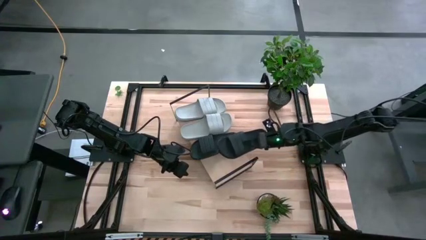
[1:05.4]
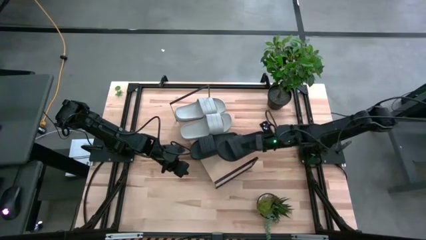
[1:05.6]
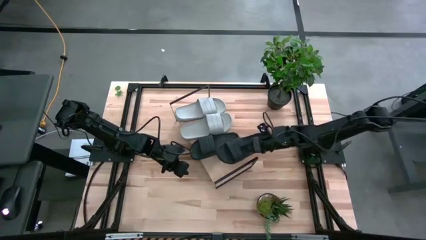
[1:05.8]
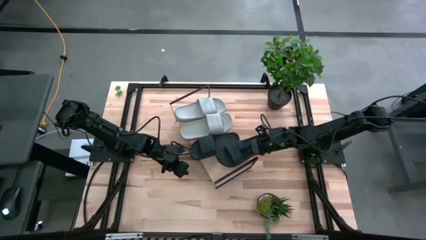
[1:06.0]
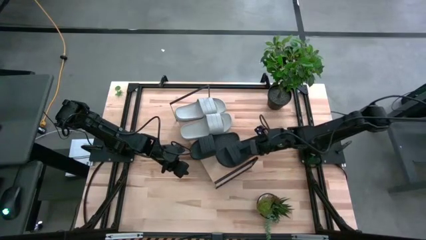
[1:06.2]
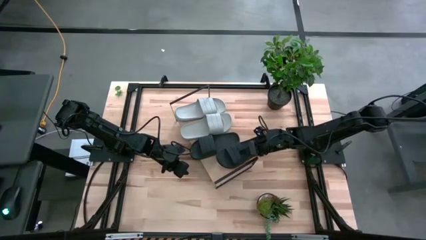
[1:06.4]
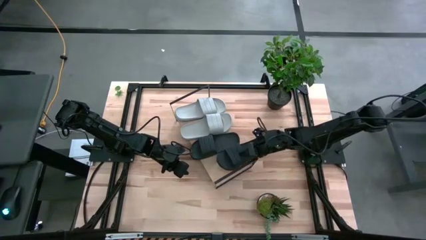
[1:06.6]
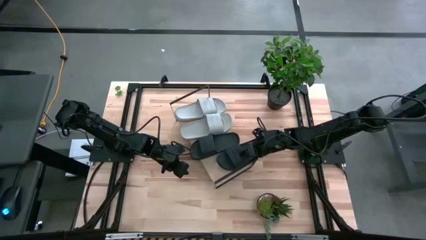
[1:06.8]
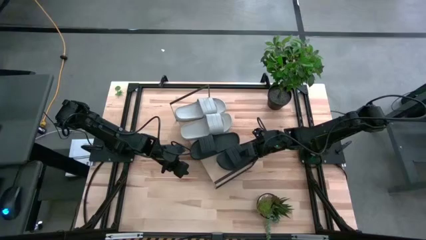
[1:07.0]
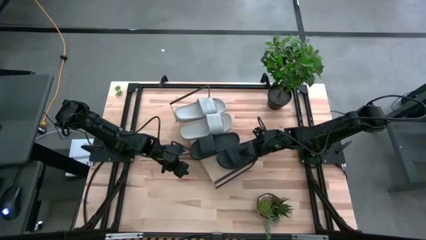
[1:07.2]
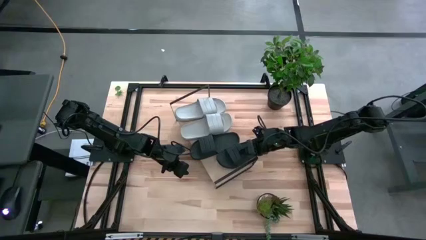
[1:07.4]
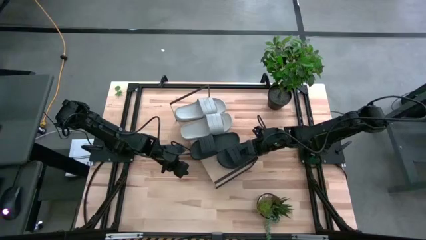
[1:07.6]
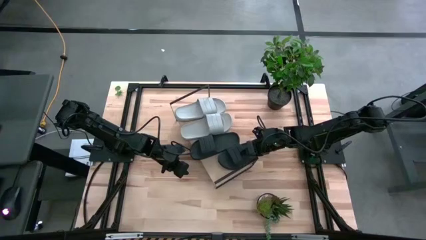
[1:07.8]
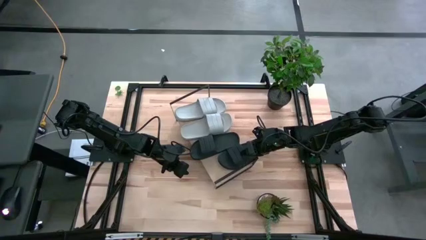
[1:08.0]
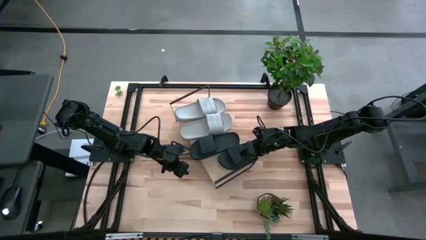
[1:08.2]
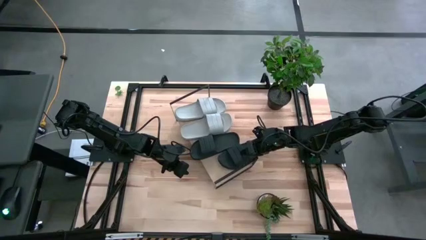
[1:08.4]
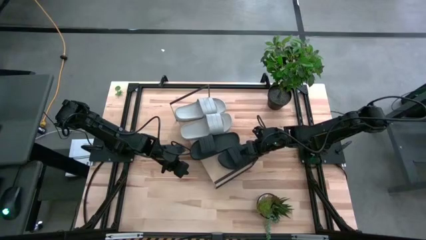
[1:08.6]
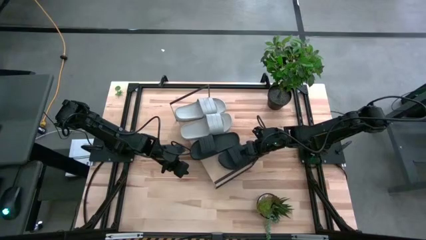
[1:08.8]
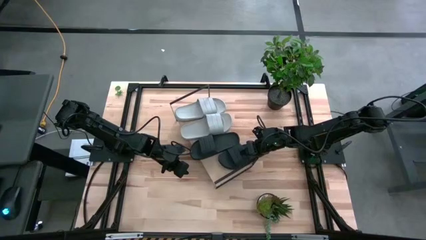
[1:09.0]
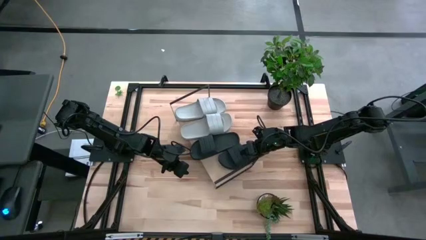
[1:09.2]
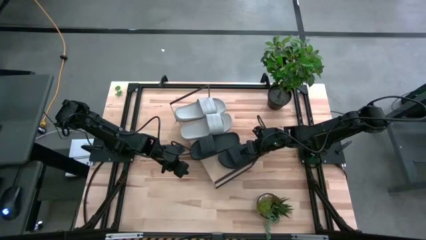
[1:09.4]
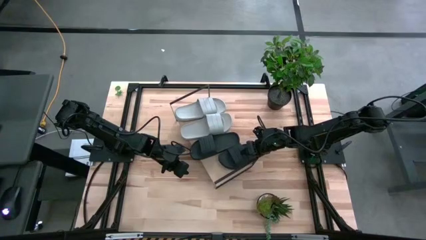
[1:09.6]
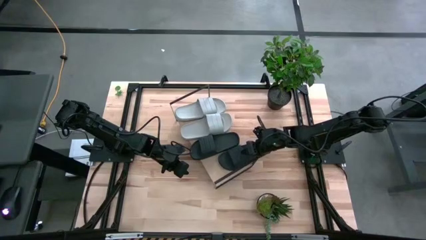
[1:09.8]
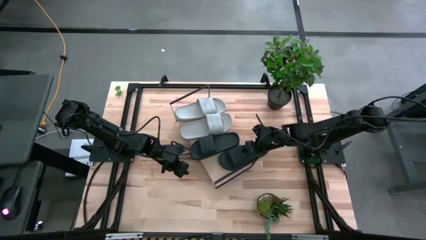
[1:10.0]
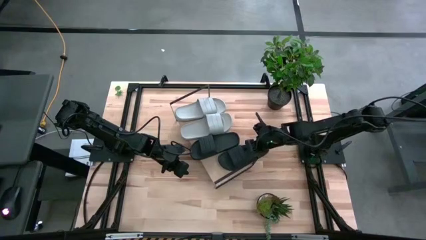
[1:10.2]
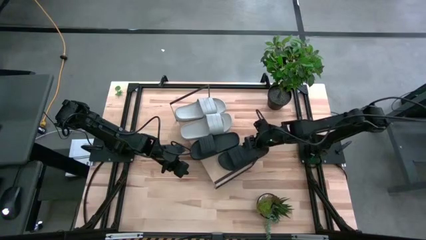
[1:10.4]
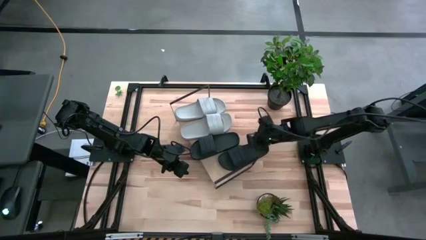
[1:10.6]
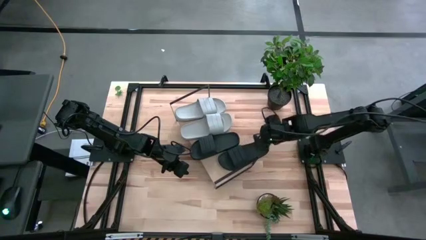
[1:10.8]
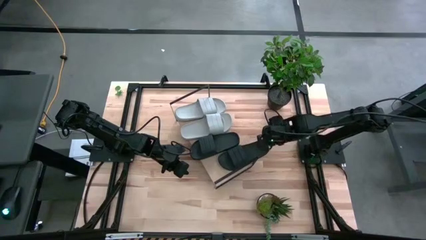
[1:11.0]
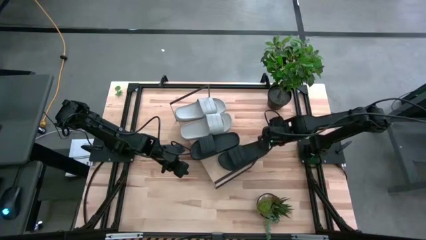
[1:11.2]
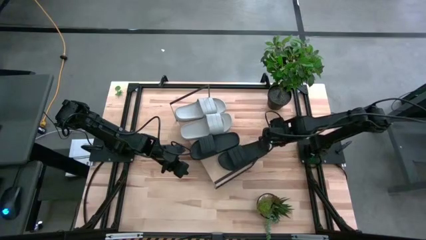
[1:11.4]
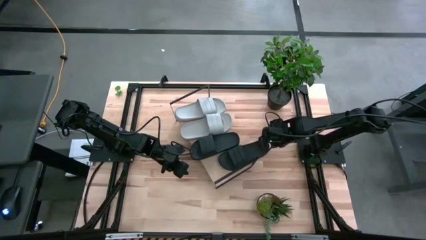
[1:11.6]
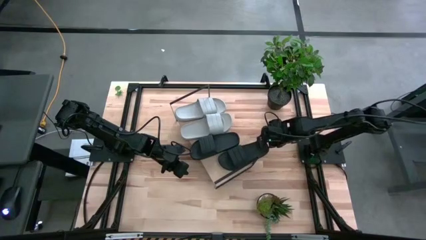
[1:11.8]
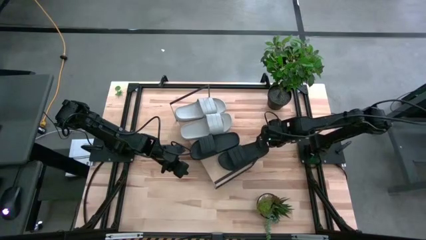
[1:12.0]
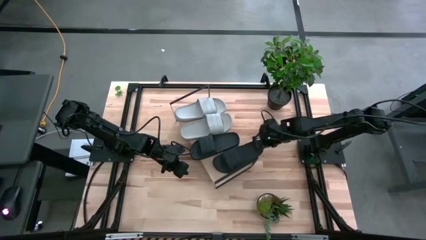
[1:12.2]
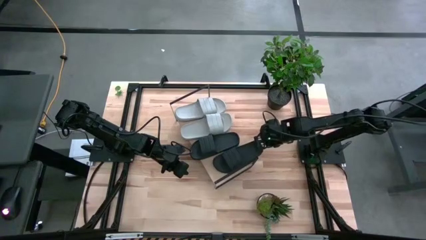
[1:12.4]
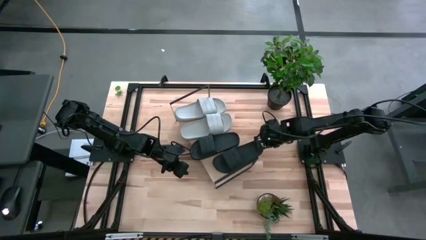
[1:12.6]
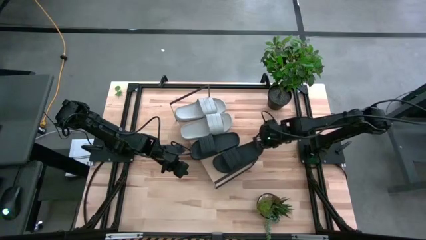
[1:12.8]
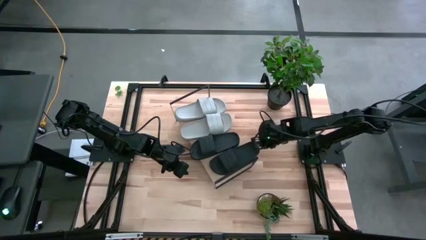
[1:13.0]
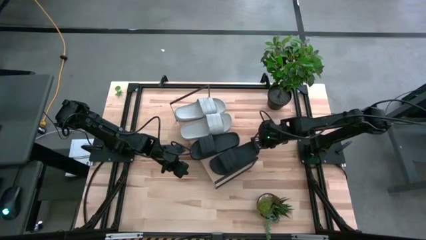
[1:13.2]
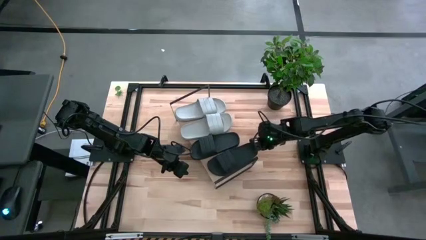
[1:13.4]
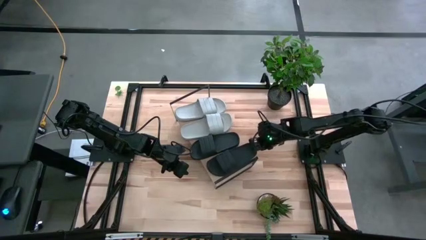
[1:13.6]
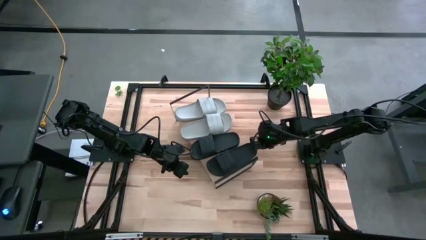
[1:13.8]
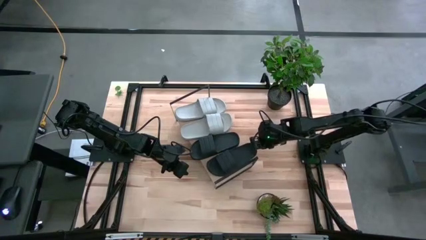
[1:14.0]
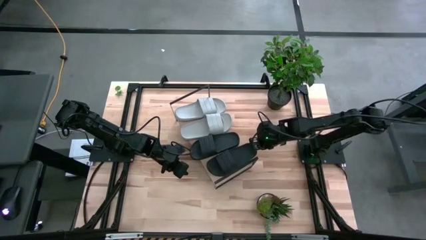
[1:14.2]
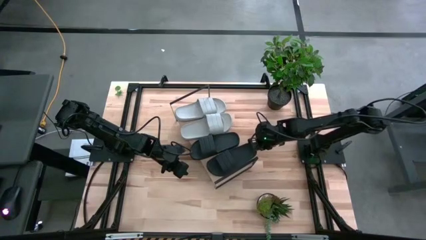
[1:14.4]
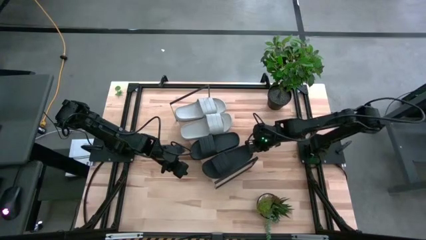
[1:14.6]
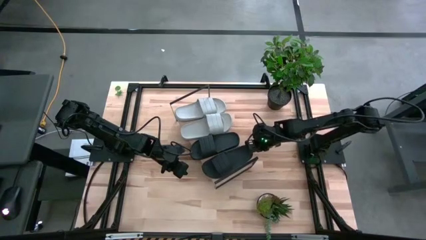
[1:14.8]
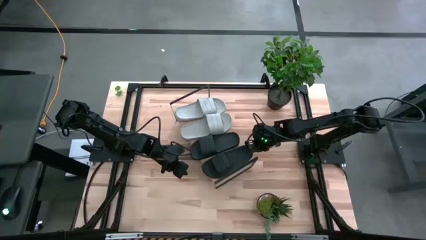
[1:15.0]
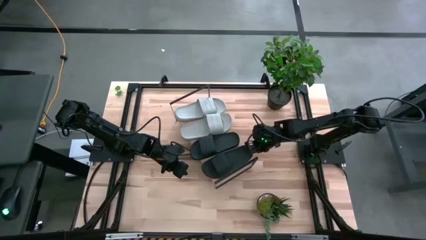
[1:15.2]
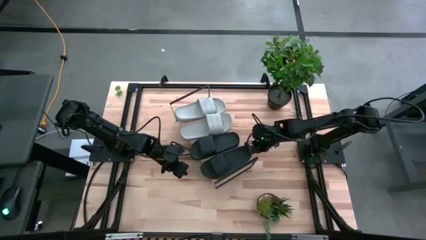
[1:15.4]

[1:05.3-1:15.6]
Task: Pick and place slides into the shelf
Put the black slipper on the shelf

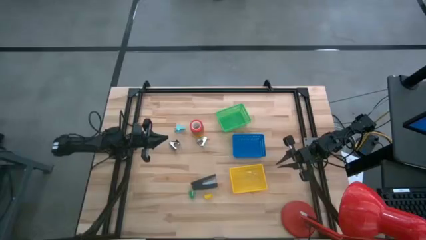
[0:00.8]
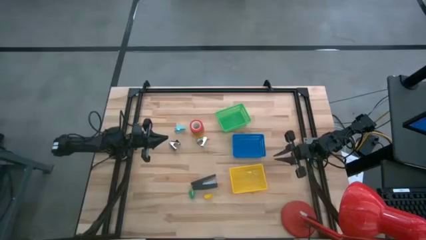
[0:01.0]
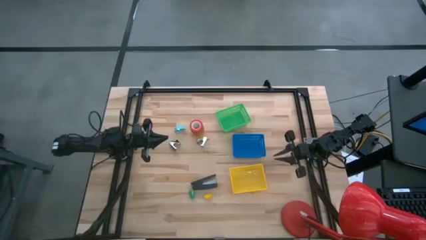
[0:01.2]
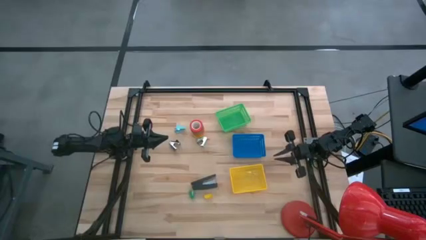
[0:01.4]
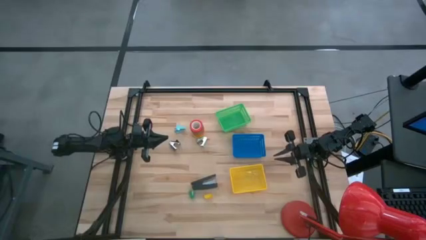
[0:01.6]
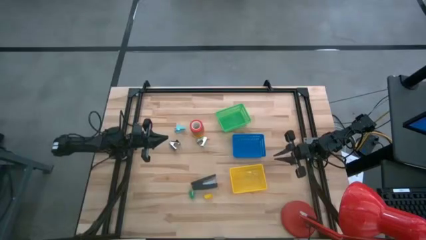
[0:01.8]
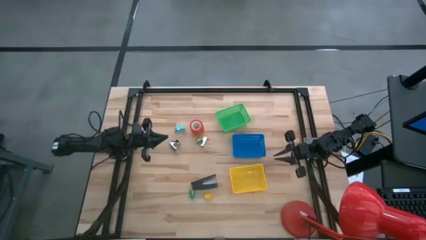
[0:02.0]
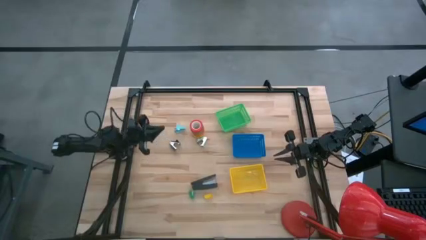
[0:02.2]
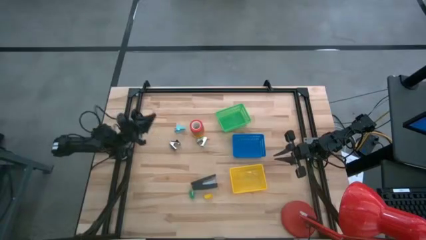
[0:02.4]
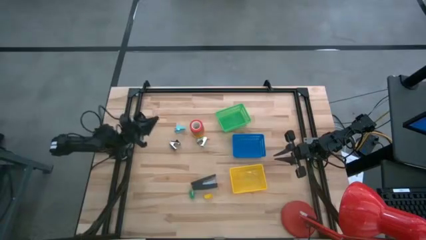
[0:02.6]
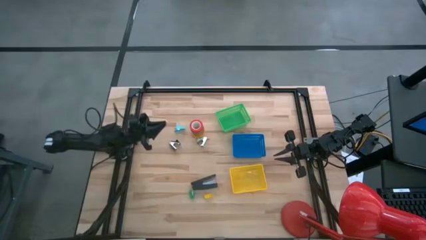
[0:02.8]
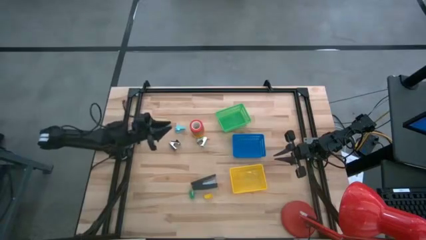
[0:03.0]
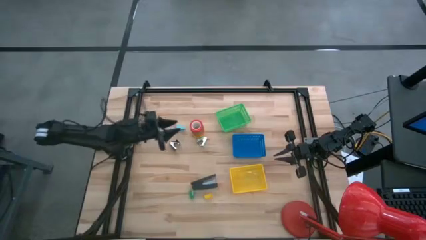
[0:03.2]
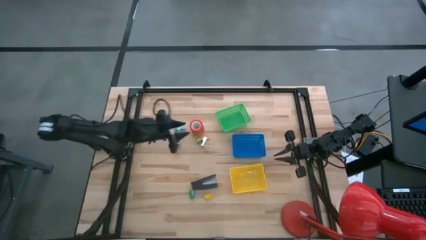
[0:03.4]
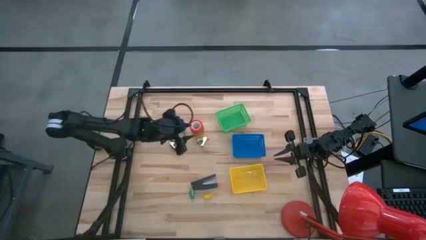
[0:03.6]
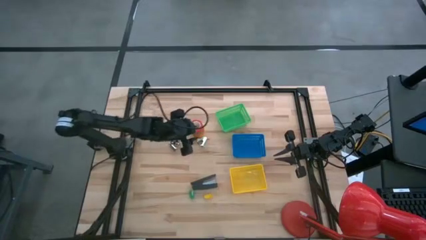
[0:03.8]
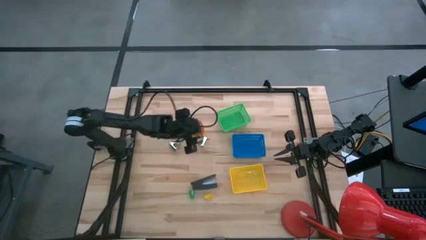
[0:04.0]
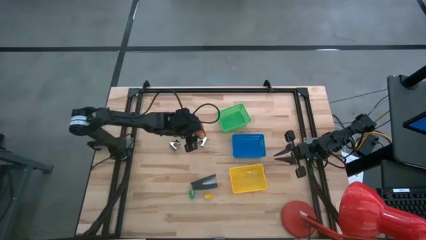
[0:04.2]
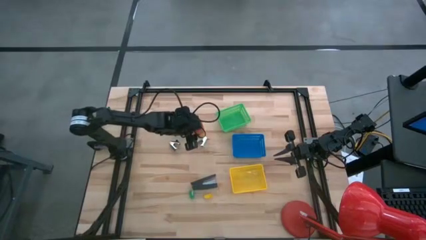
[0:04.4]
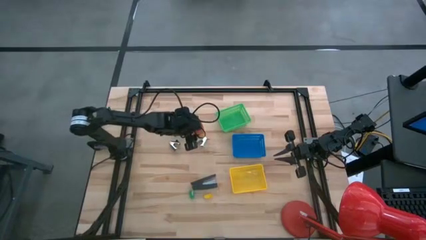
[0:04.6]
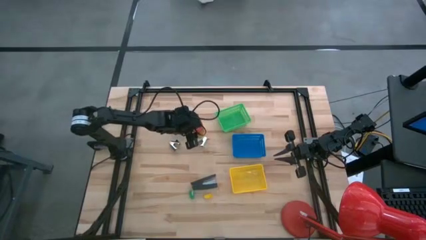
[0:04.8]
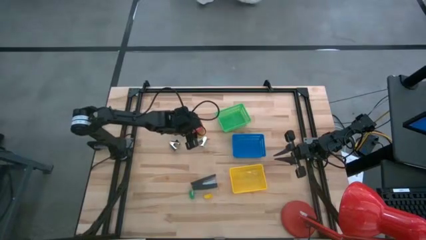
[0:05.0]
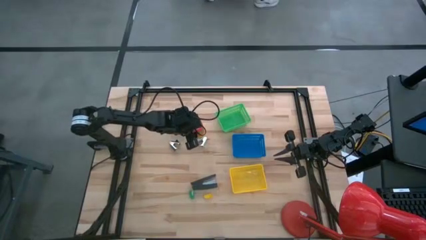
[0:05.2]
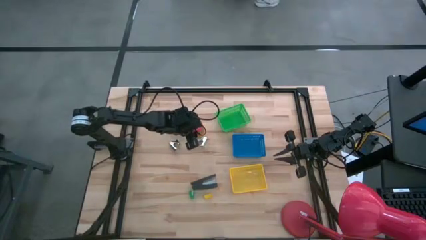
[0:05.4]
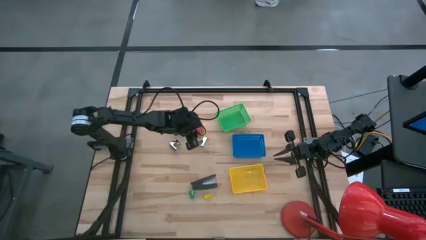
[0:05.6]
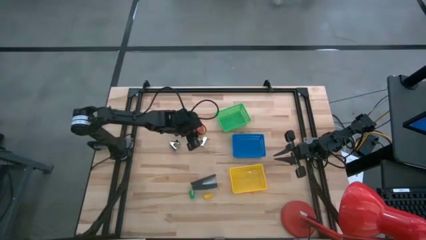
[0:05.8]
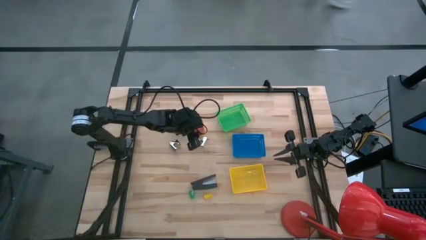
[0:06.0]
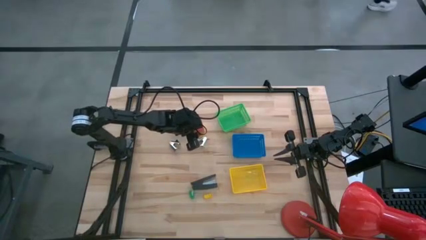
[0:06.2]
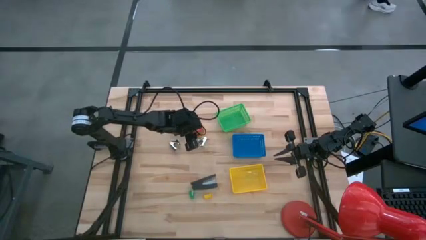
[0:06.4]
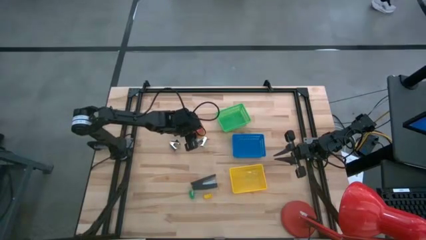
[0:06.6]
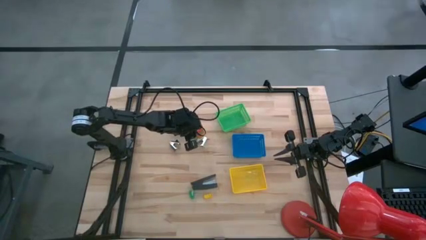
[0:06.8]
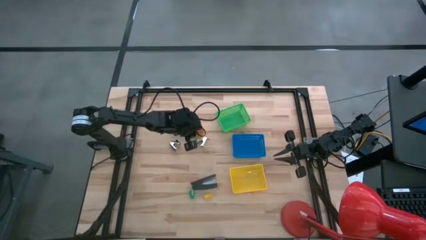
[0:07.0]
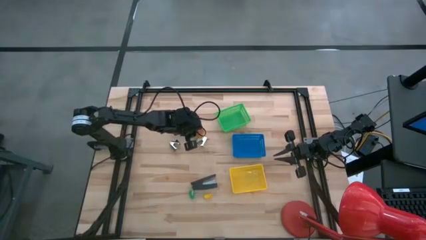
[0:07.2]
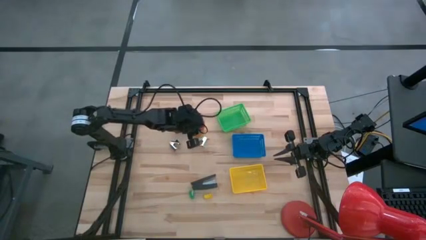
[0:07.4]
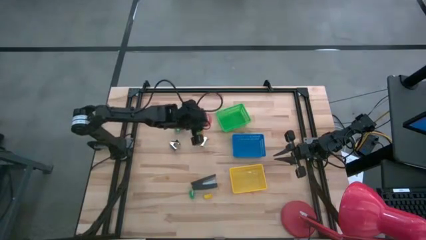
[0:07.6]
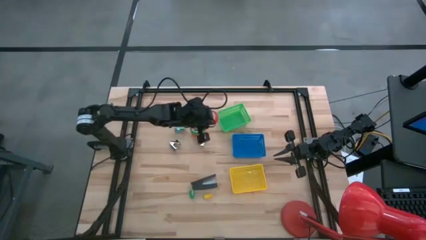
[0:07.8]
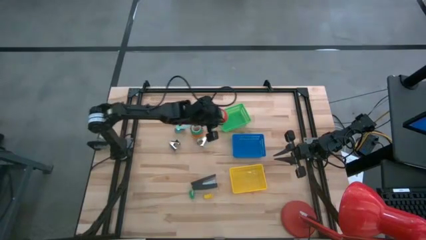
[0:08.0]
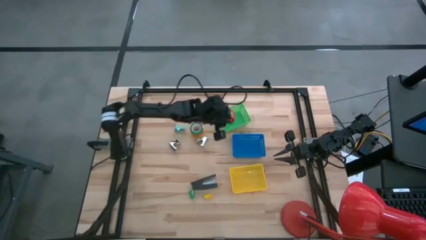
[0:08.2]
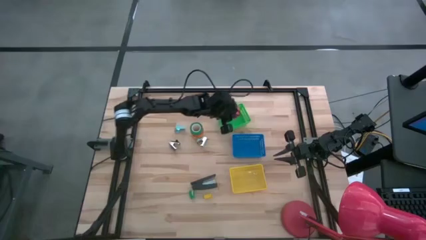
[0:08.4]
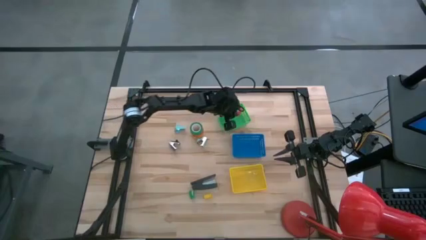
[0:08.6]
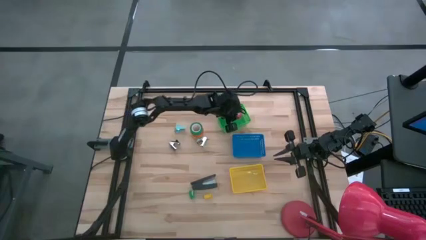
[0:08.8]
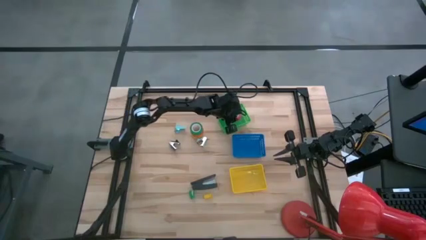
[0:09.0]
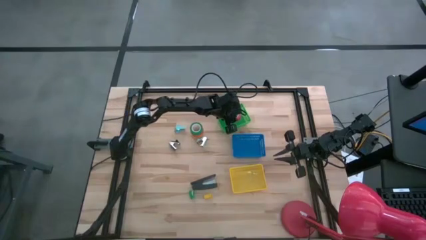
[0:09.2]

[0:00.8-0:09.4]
Task: Pick and place Stapler, Stapler remover, tape
Put the red tape into the green bin
